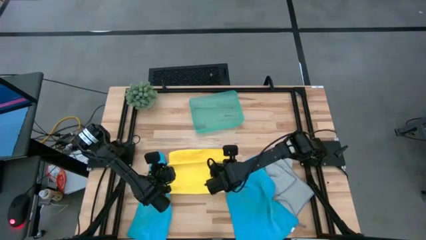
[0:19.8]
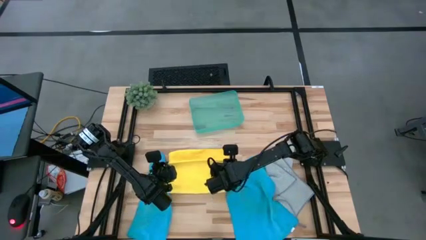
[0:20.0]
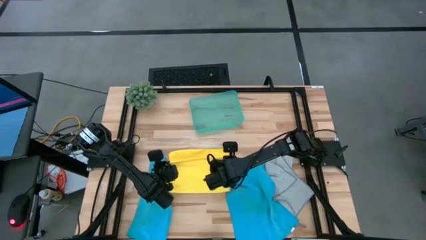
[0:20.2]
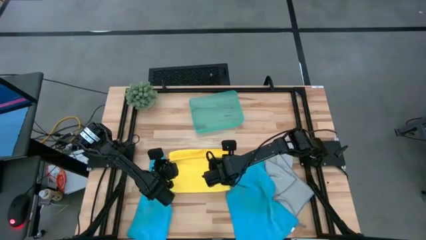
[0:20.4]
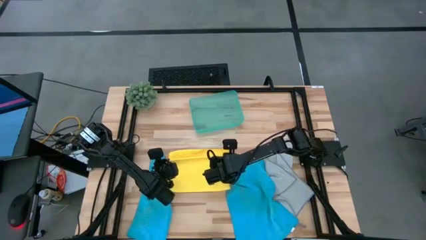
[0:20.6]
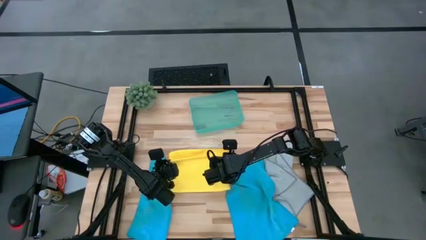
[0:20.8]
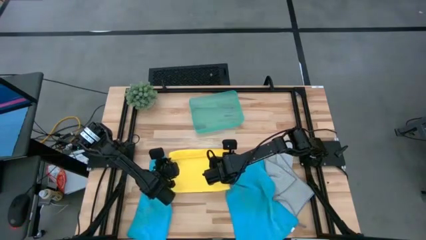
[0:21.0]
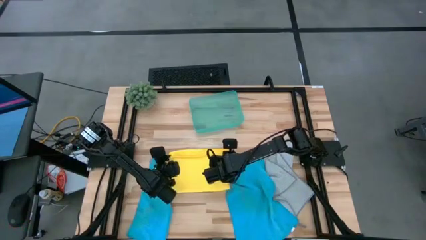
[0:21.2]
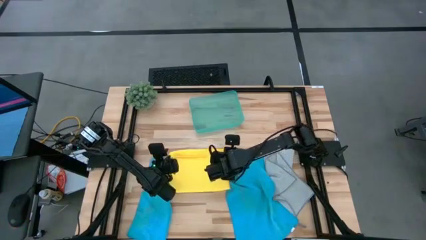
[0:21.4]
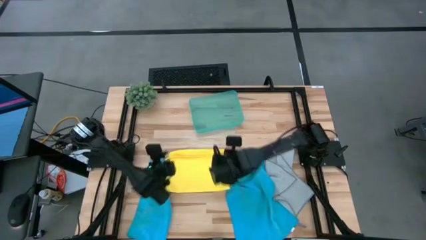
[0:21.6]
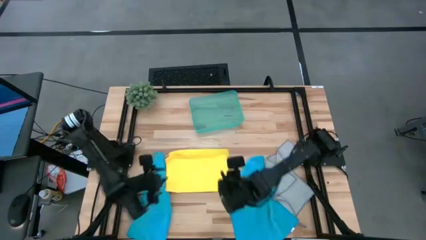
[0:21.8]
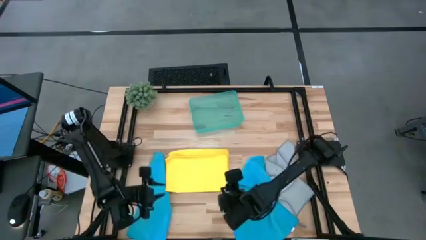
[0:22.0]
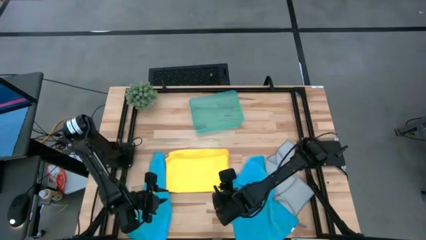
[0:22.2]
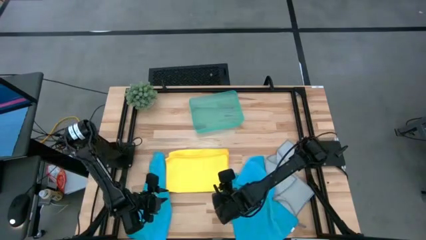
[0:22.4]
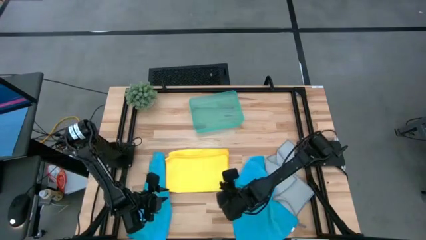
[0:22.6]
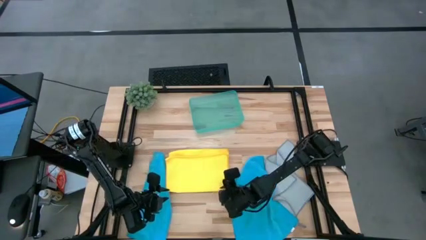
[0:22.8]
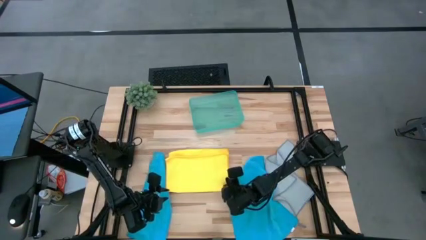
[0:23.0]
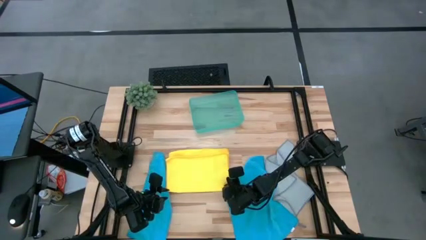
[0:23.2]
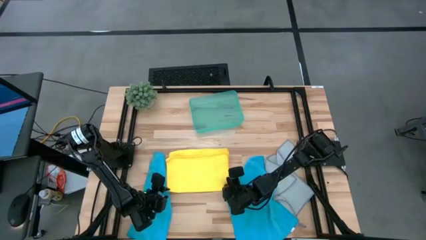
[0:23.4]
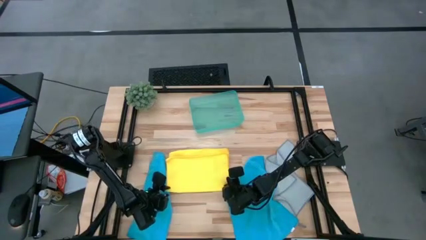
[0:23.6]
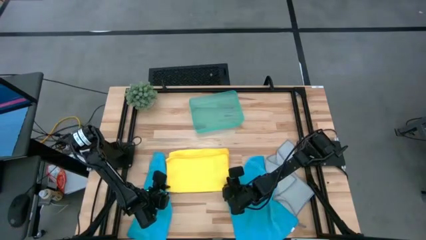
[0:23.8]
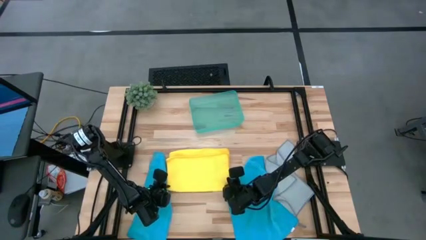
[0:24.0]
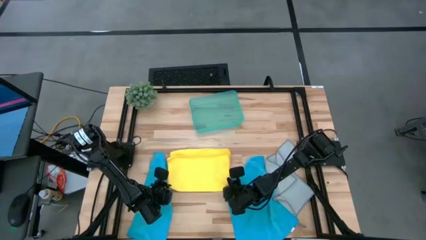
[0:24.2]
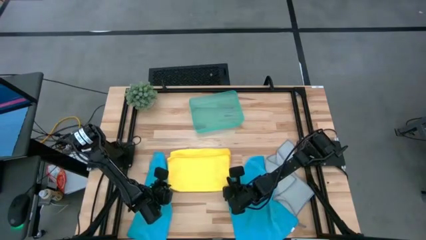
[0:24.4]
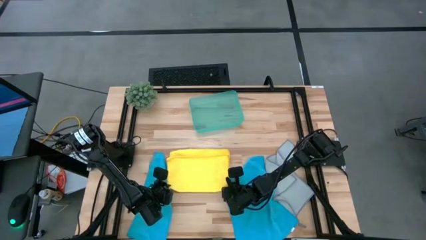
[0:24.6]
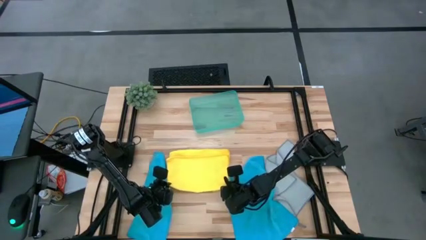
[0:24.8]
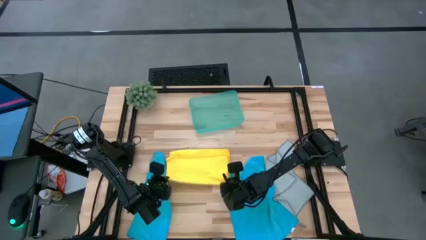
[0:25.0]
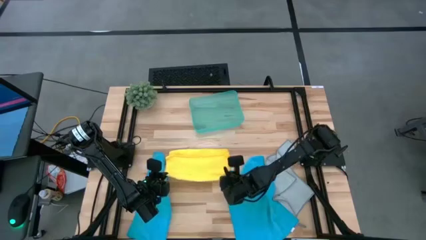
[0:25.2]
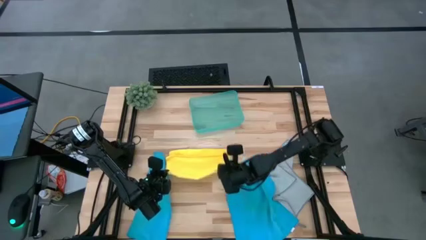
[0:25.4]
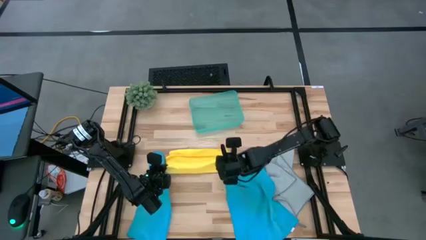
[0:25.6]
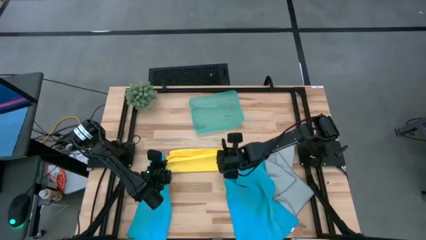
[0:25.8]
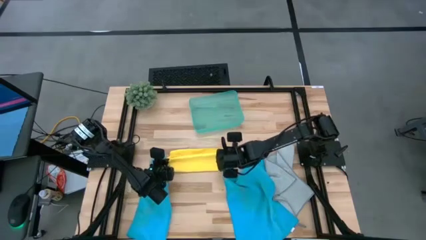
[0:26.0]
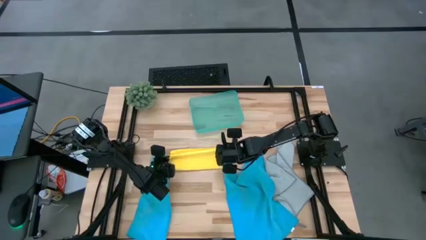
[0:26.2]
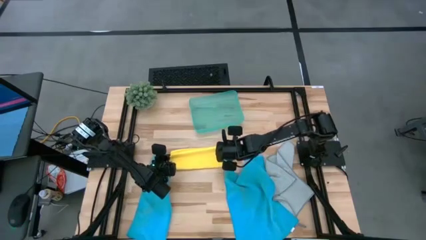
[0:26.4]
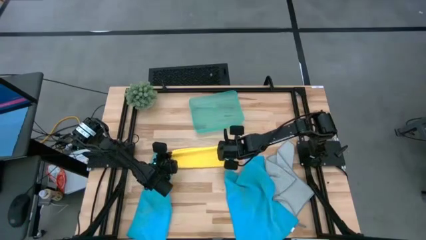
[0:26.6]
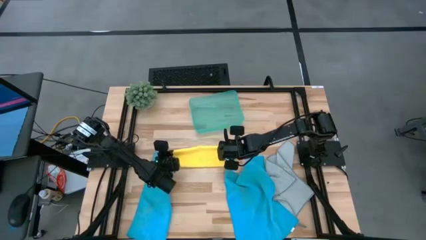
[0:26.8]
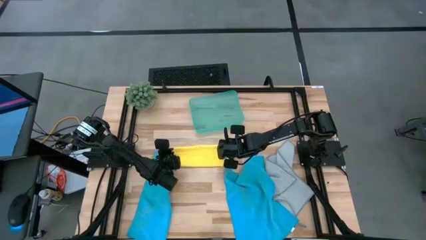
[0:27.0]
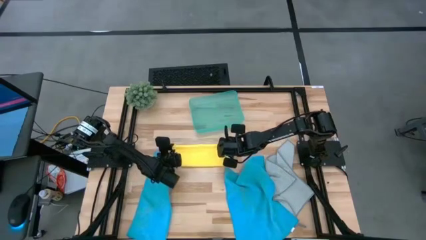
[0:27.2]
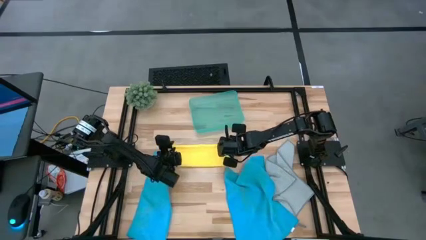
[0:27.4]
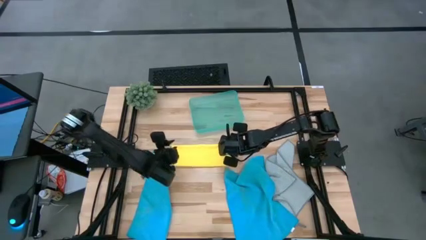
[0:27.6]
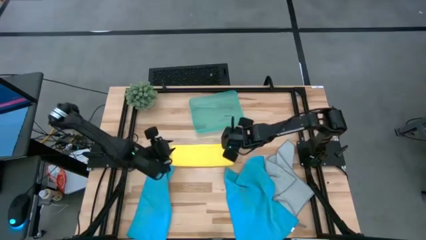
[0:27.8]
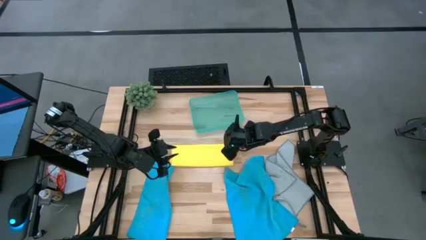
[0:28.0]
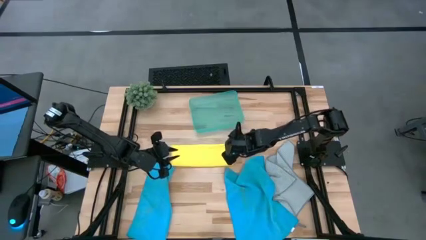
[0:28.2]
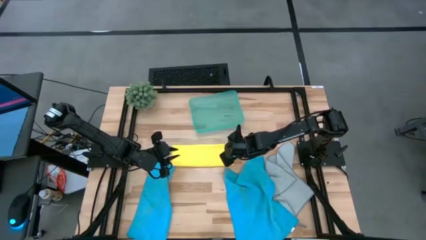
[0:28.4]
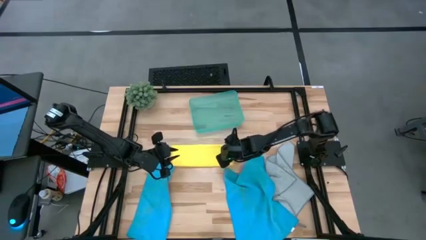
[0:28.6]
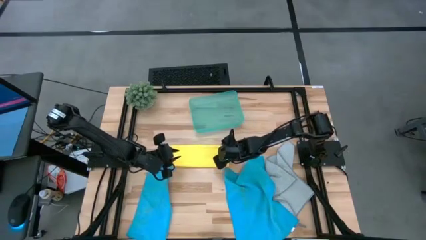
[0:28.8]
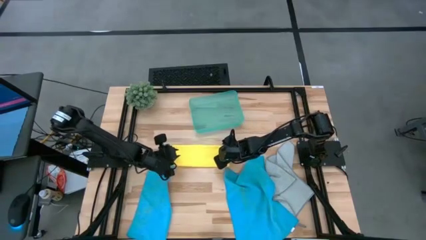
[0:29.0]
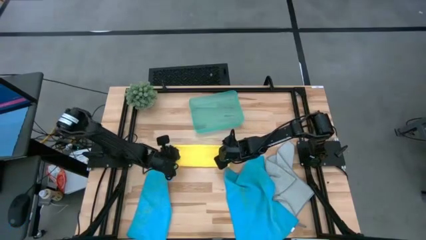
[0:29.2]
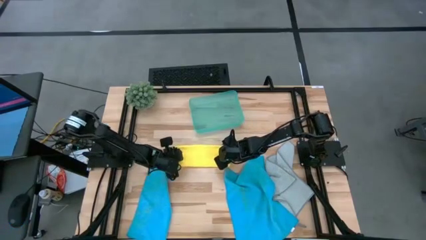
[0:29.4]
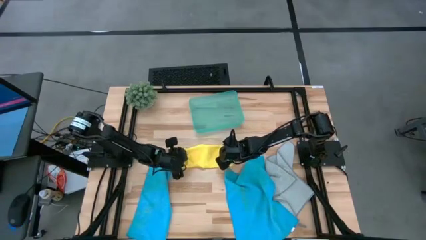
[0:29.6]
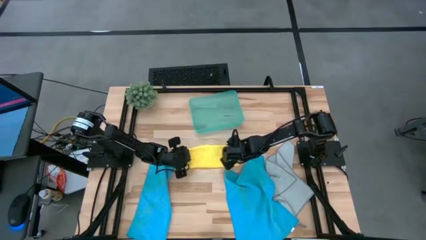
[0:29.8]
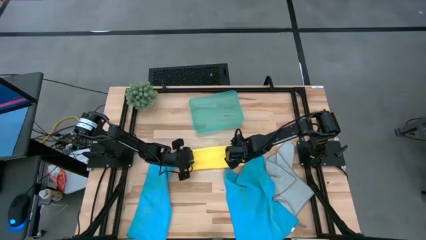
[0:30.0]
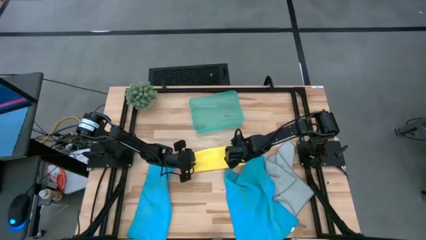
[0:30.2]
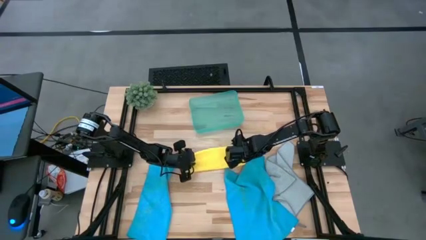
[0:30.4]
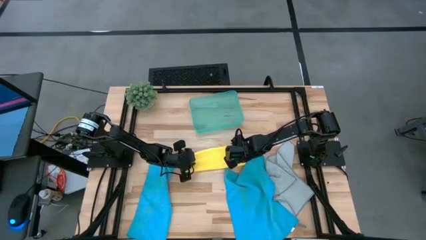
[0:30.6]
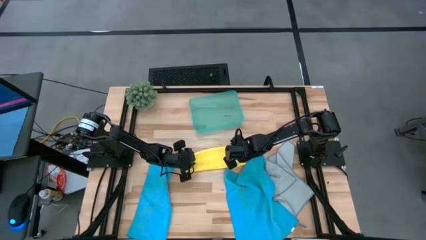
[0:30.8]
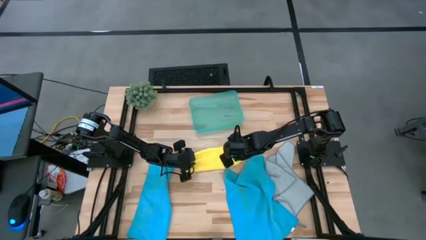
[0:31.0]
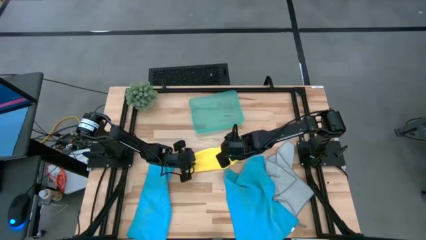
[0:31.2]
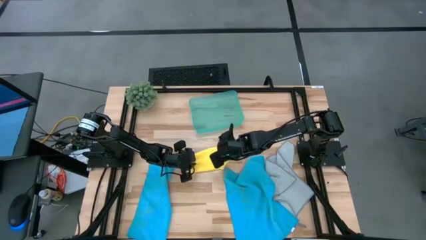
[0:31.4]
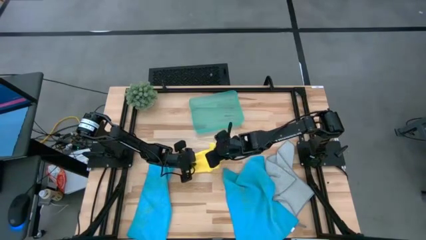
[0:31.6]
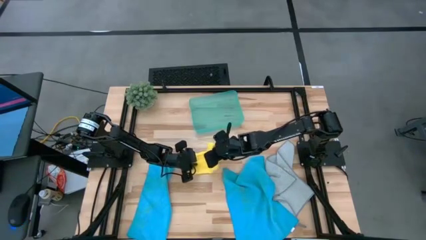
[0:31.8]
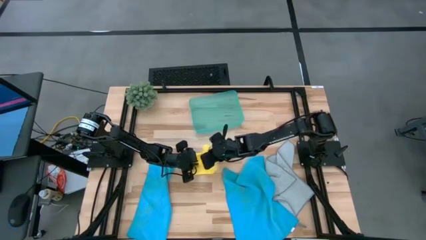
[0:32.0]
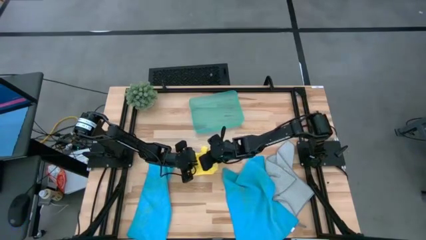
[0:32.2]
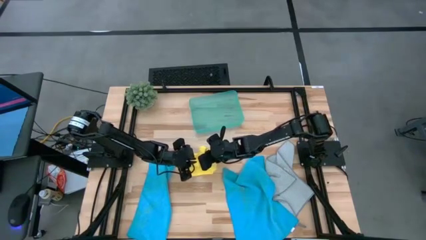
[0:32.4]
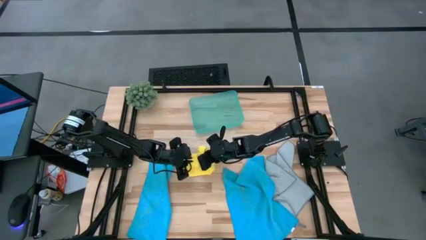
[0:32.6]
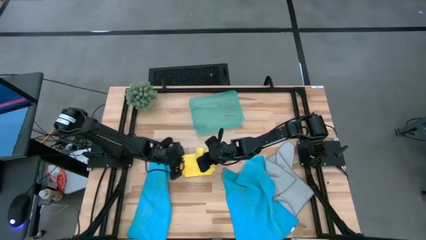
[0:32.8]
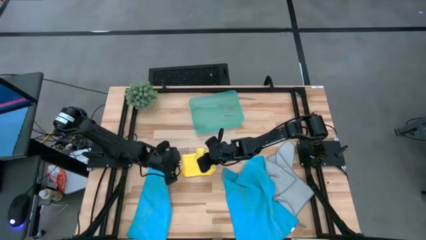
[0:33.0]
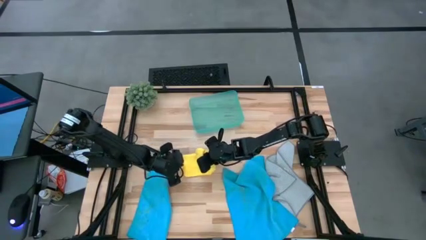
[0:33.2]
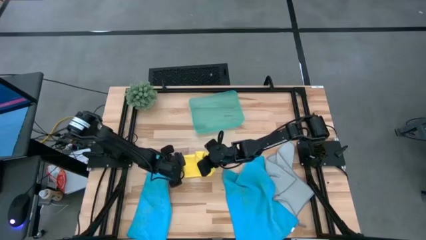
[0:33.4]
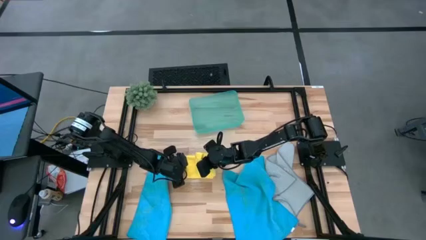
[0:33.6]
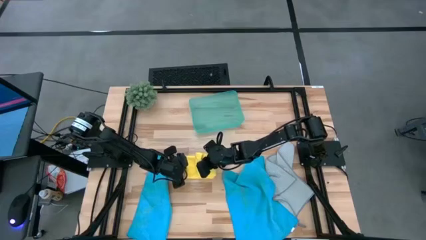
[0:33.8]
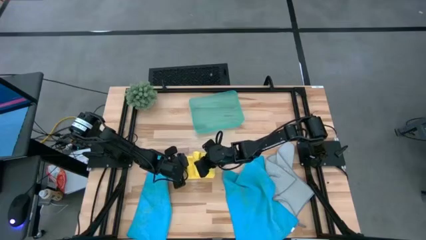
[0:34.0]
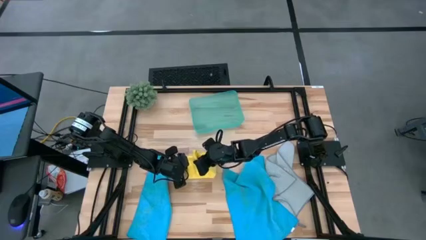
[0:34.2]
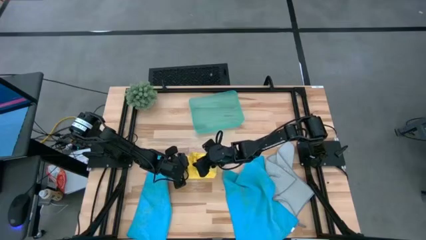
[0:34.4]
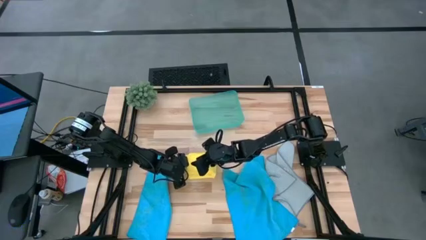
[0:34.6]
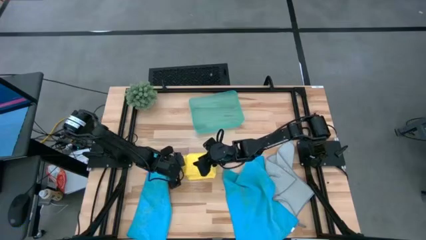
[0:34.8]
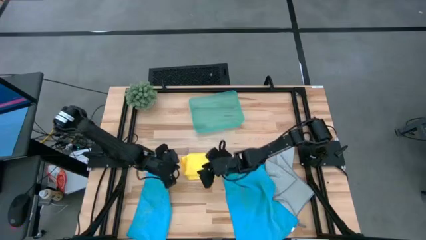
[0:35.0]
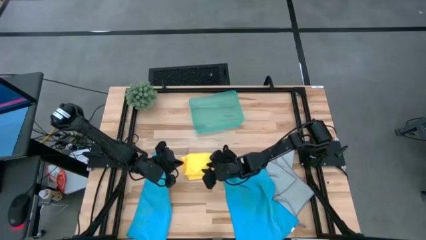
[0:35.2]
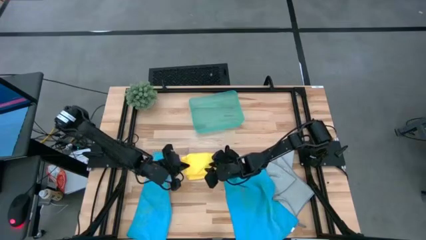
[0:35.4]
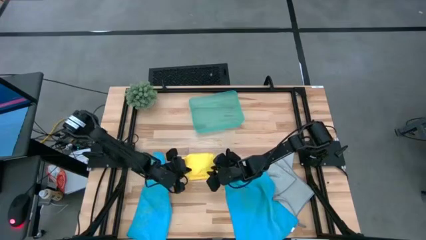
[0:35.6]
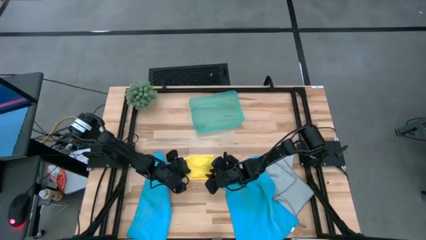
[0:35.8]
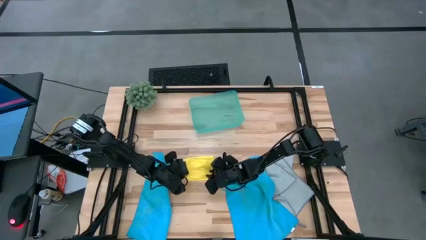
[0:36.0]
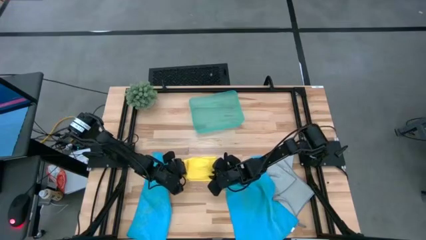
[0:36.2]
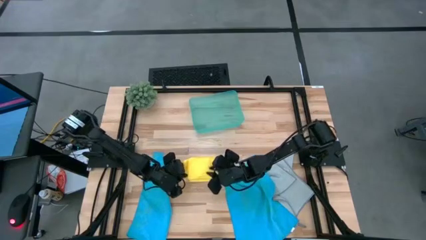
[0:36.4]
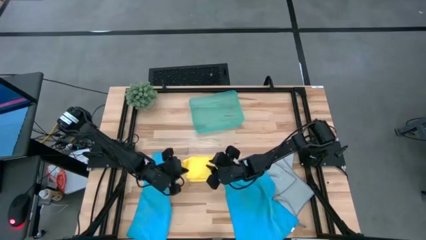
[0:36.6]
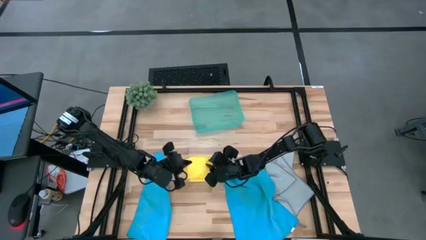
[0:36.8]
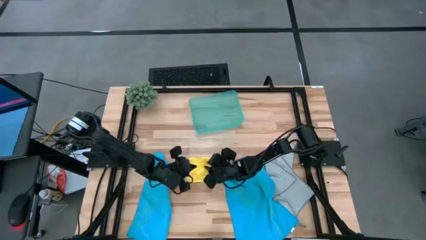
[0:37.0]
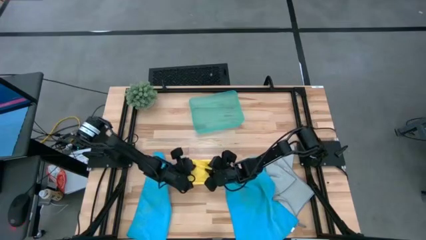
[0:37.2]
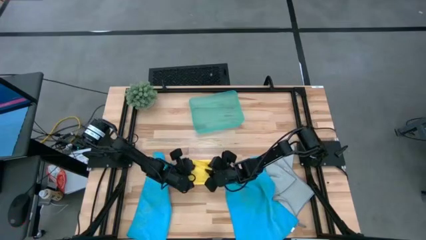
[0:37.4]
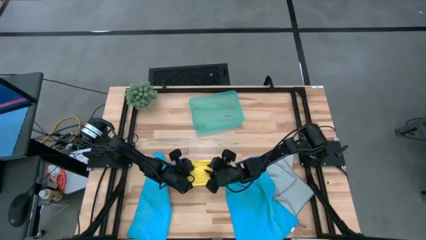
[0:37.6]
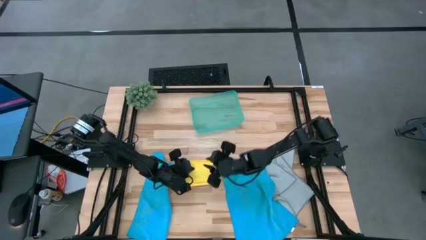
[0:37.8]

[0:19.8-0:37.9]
Task: Fold microfiber towels
Fold the yellow microfiber towel
